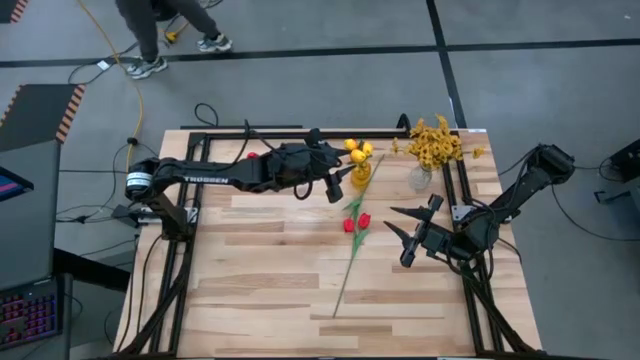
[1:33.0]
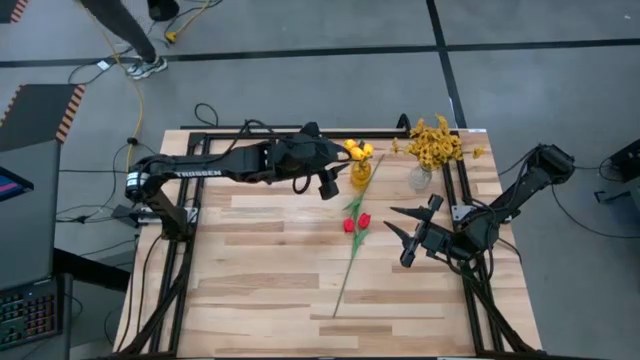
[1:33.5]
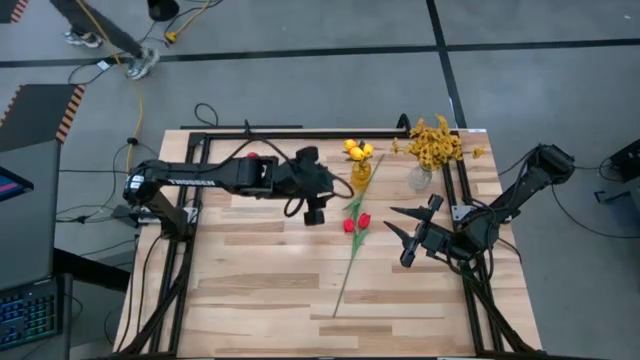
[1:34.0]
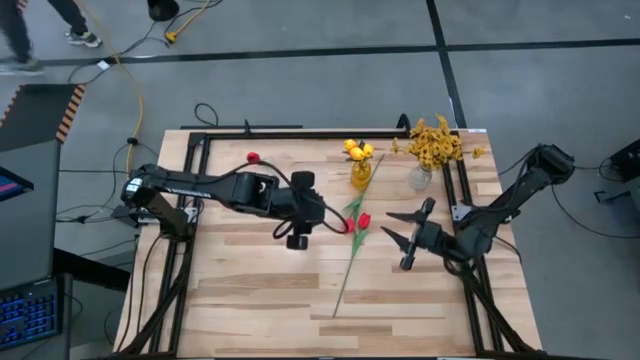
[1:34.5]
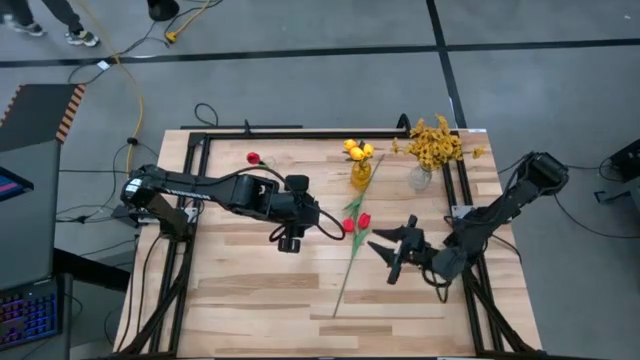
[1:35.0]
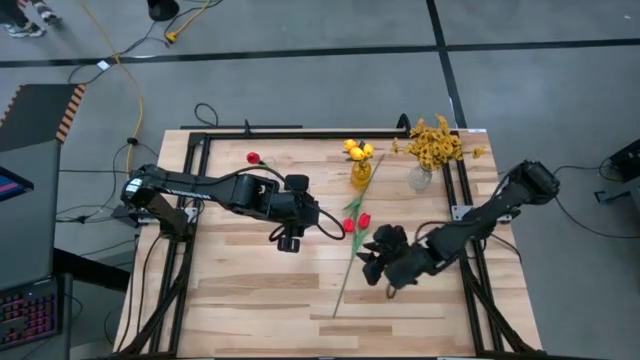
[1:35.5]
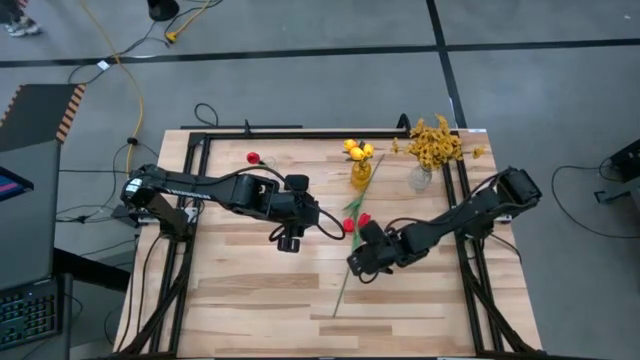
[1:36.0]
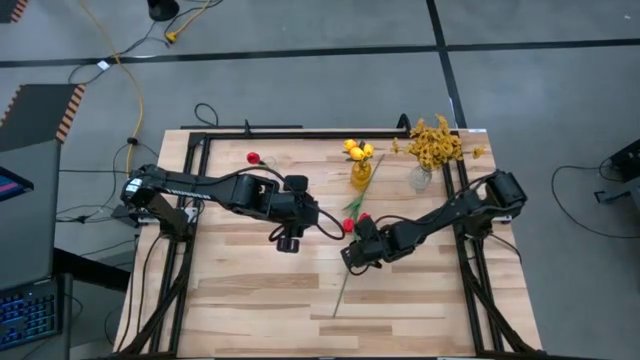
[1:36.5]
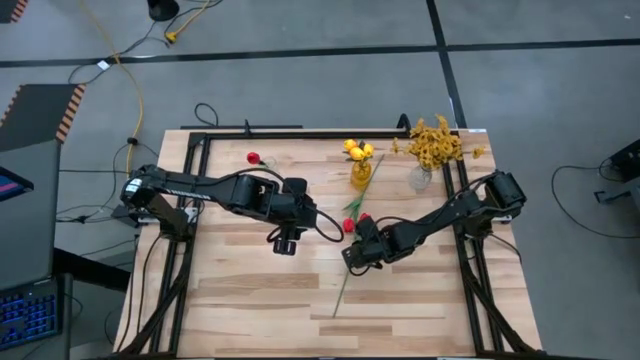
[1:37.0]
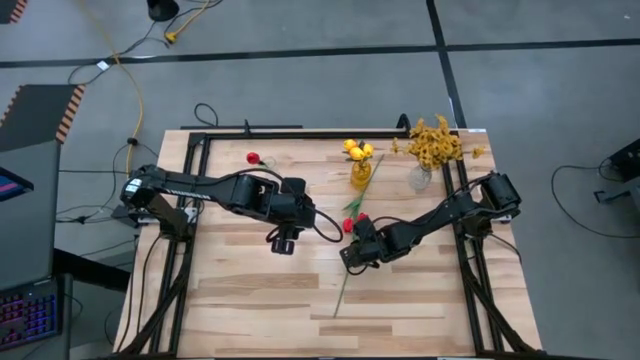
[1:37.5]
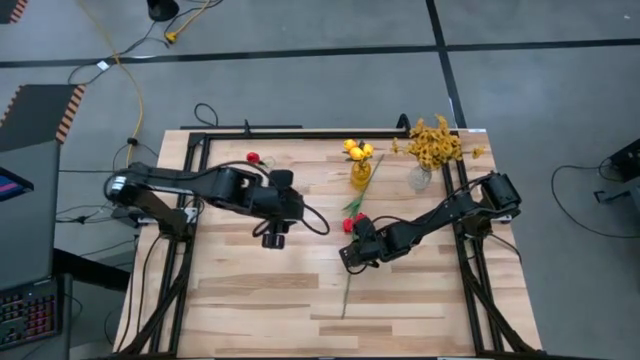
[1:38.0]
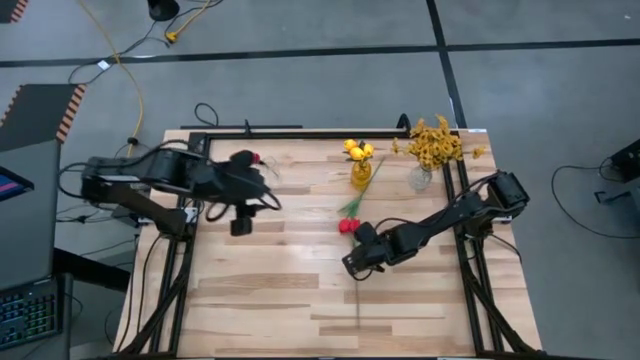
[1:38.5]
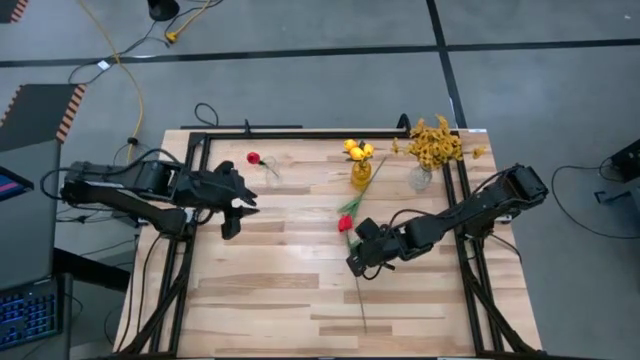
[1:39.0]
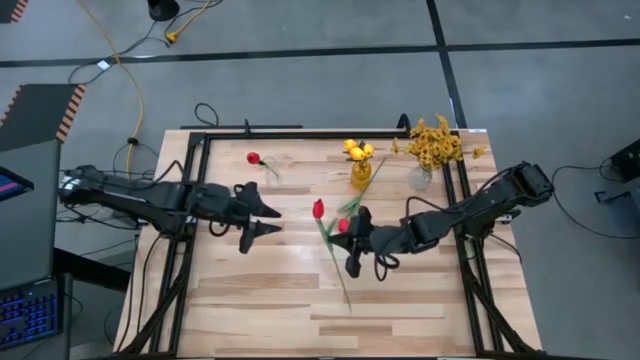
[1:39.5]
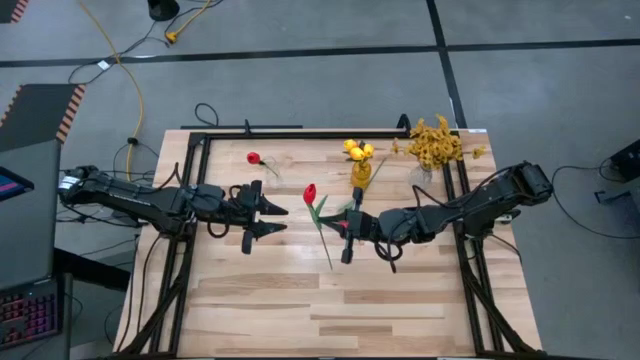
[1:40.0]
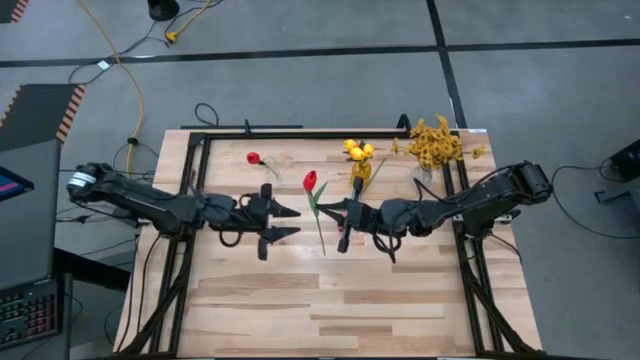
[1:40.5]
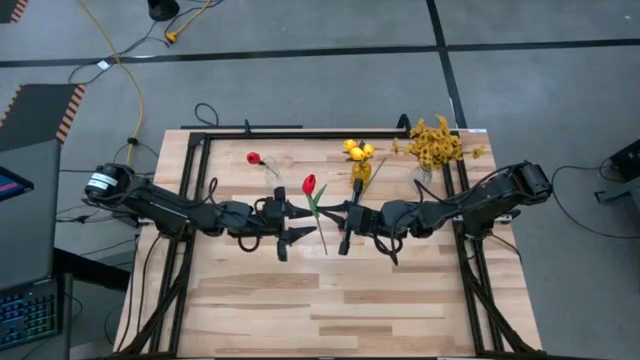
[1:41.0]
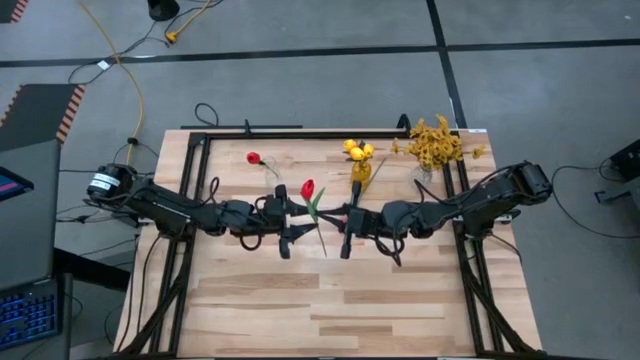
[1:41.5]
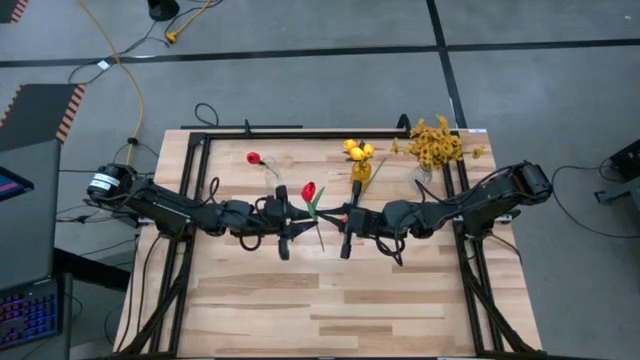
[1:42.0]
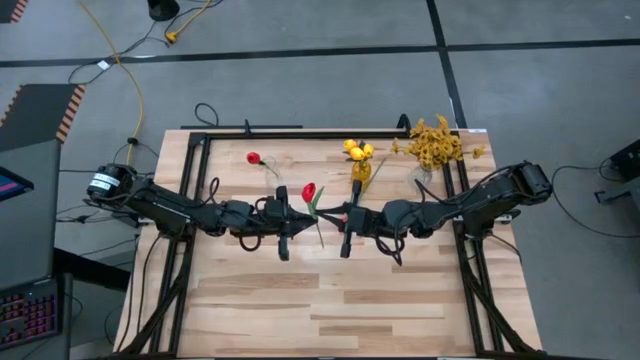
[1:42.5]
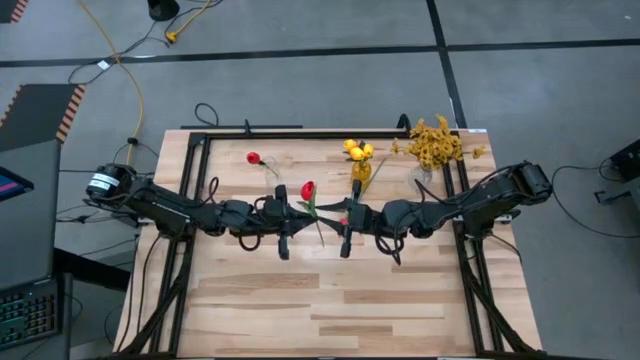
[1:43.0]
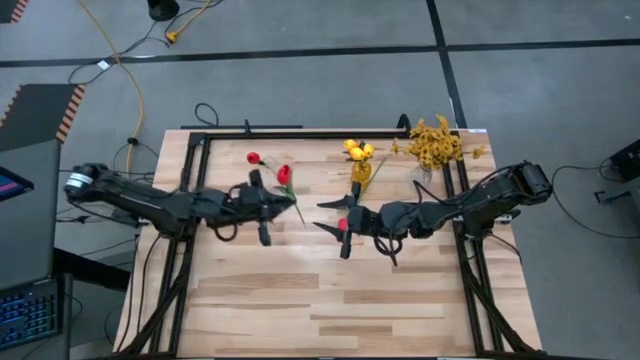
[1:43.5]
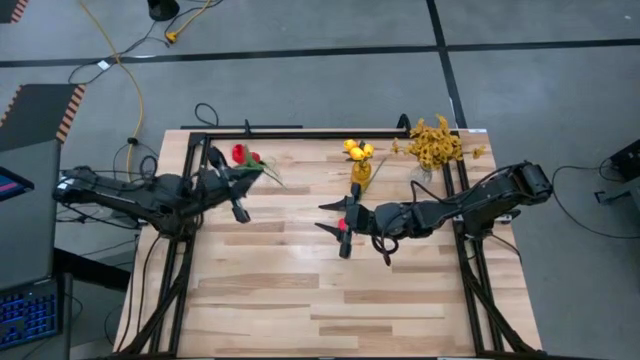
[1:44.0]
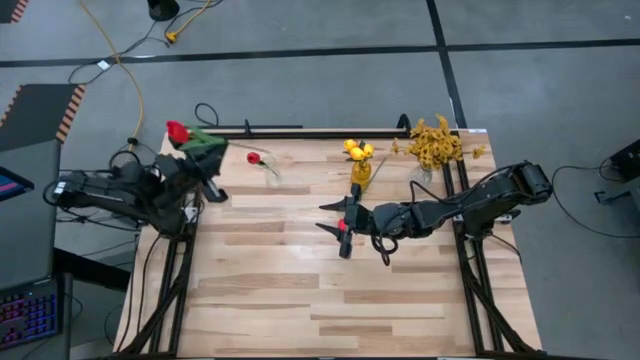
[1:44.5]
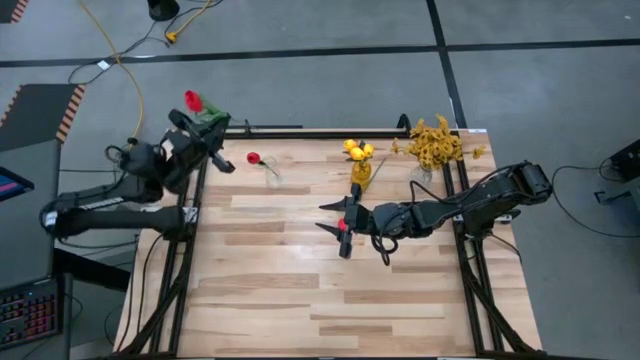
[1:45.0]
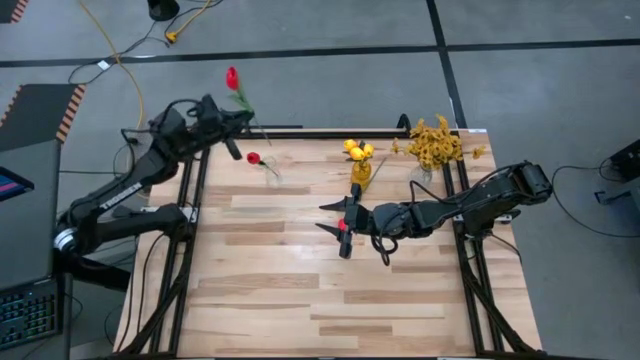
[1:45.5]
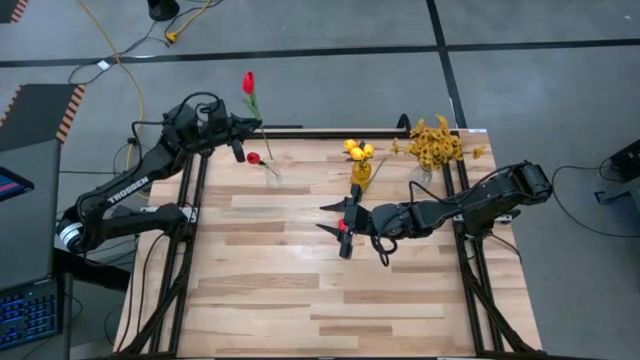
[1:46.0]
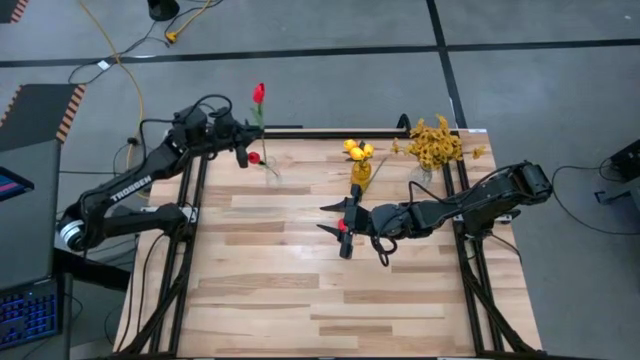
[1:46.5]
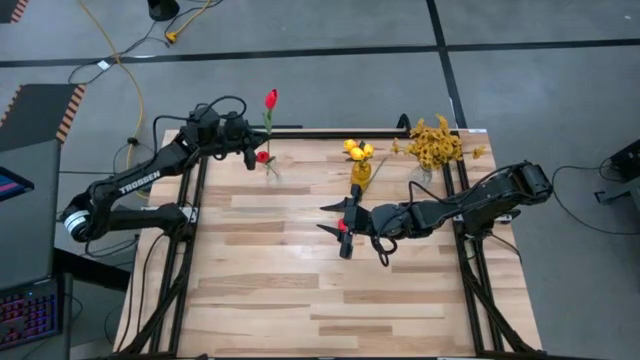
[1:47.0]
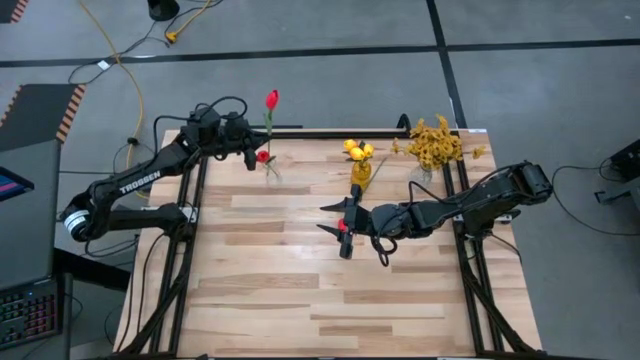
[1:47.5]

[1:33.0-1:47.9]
Task: Sort flowers into vase by color
Put the bottom red flower into the left transparent flower vase

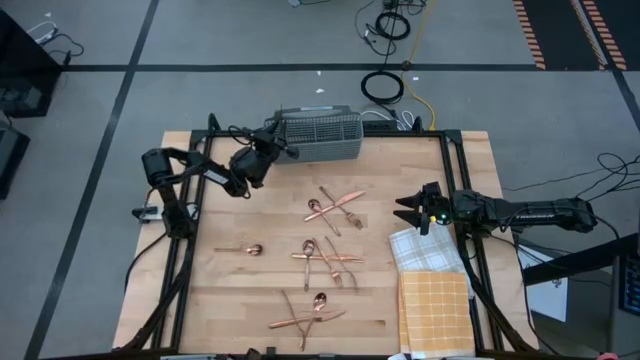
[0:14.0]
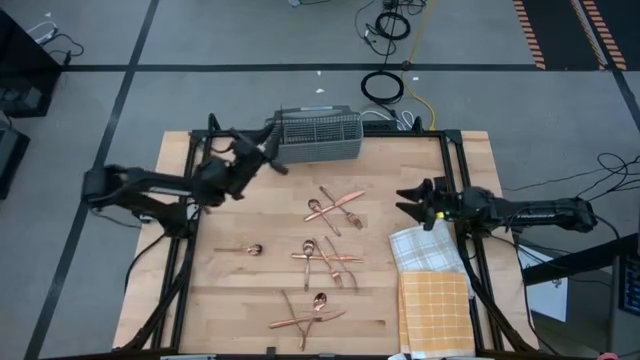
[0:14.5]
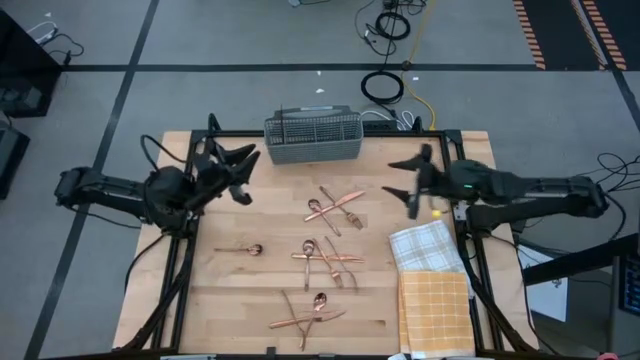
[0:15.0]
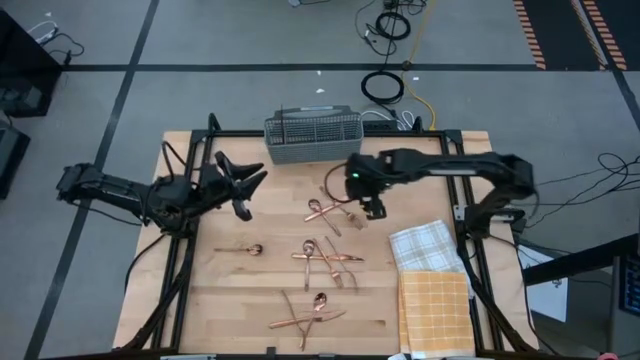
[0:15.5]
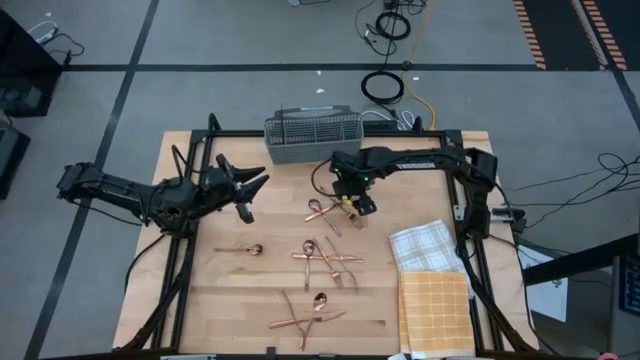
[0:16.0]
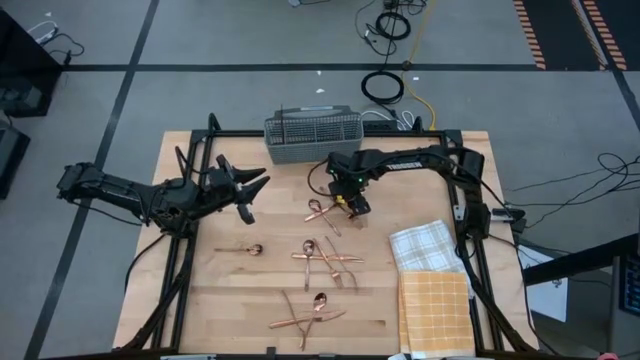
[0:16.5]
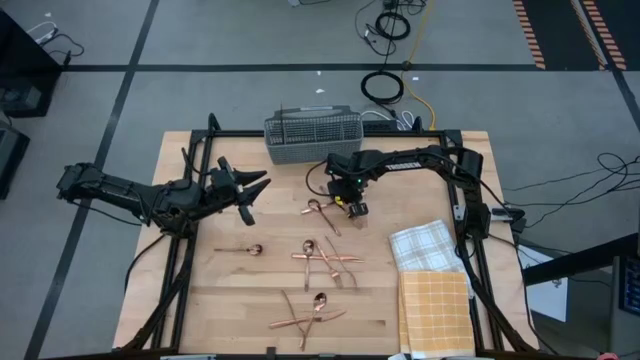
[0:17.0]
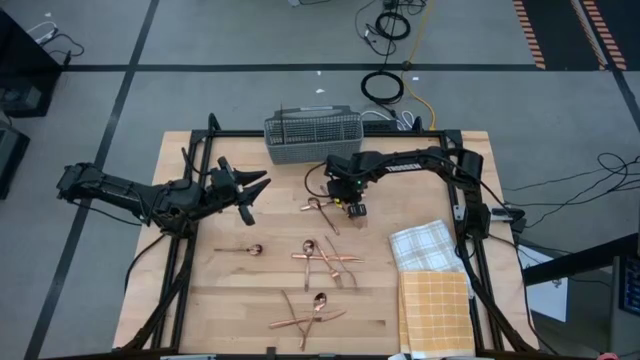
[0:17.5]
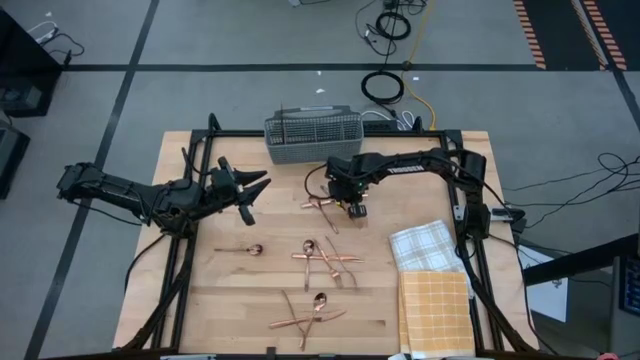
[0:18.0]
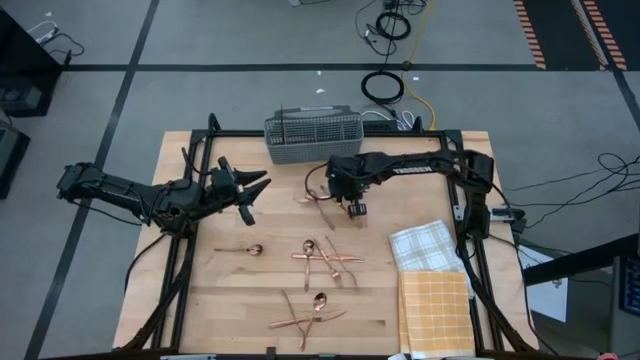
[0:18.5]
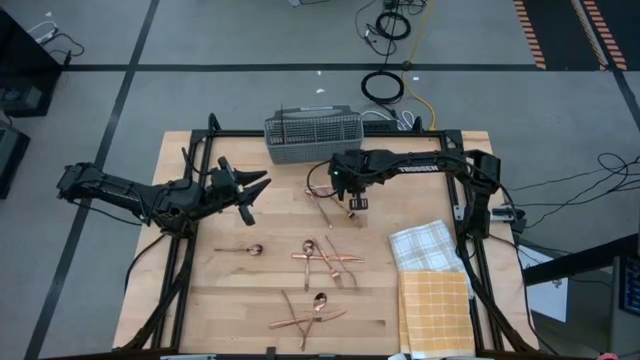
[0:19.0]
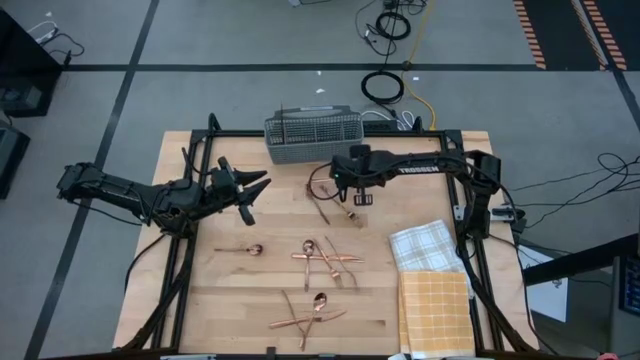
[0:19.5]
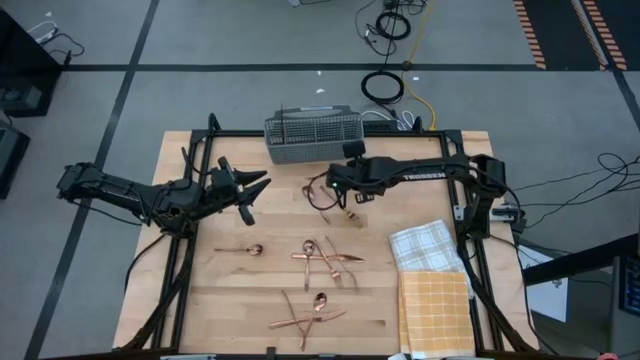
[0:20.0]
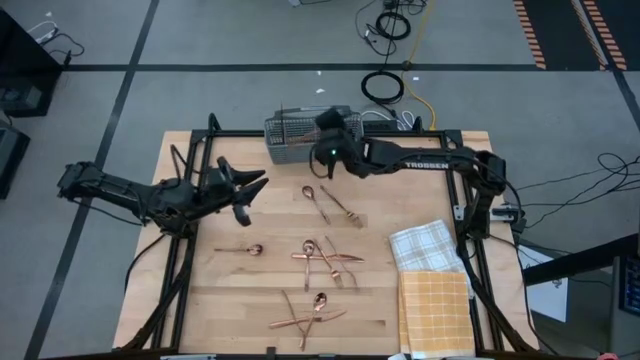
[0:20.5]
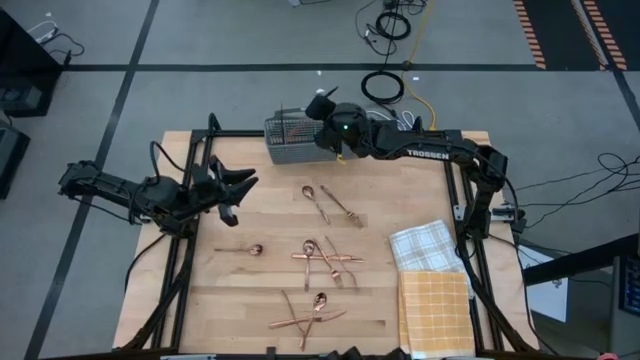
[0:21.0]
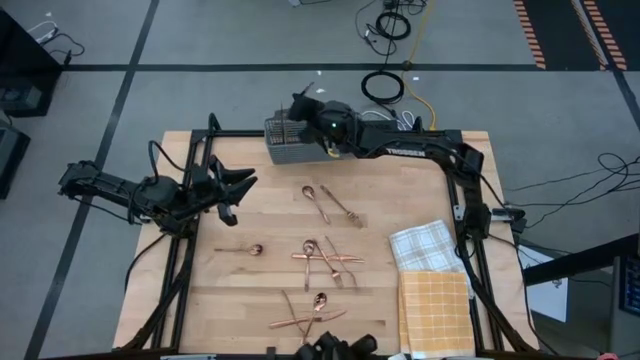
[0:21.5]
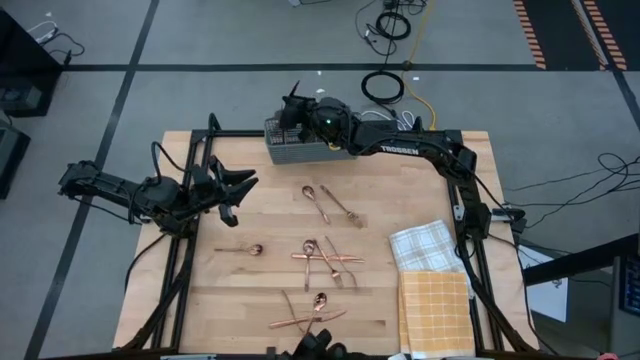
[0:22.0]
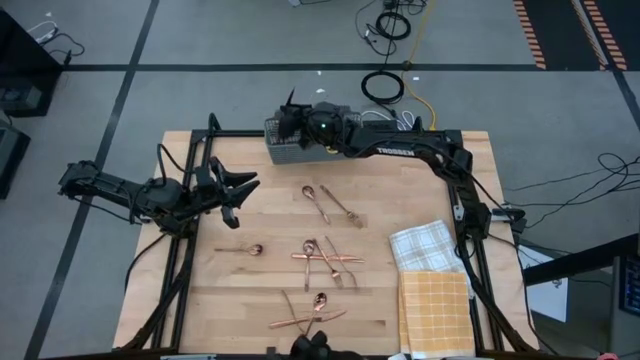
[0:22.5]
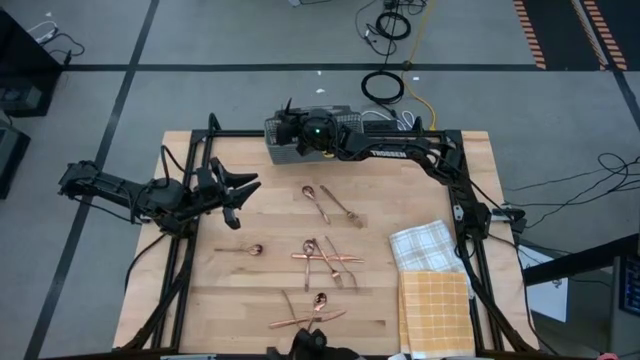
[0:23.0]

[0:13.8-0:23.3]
Task: Sort silverware
Put the top bronze knife into the gray silverware rack
